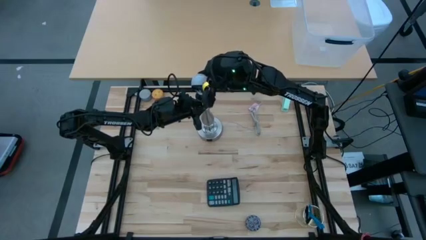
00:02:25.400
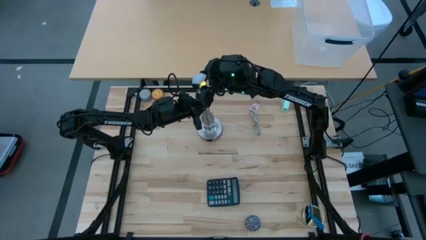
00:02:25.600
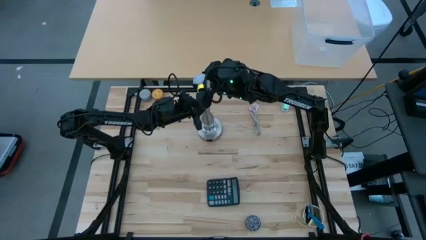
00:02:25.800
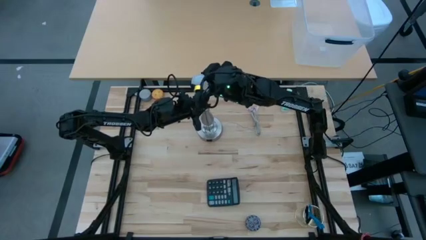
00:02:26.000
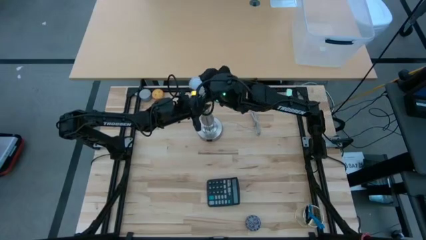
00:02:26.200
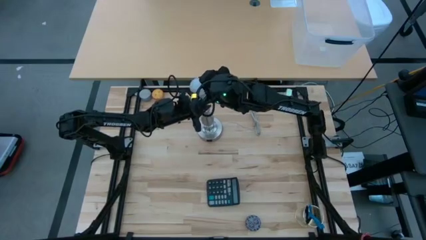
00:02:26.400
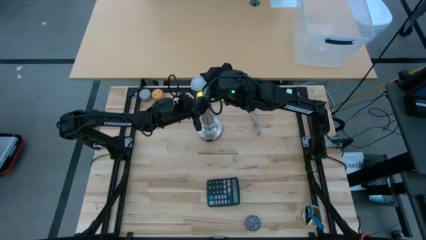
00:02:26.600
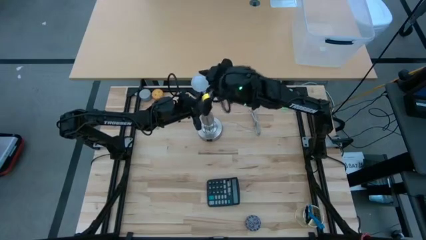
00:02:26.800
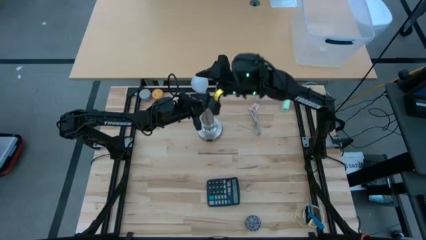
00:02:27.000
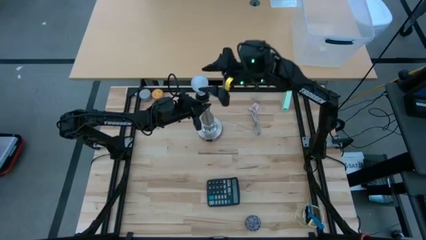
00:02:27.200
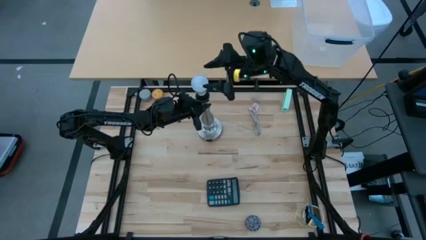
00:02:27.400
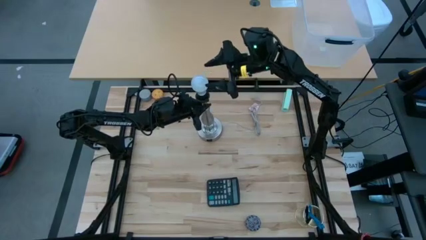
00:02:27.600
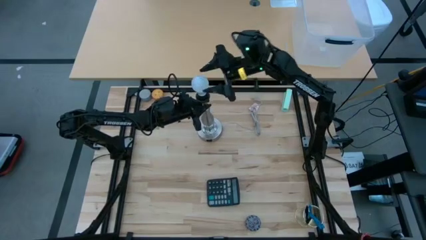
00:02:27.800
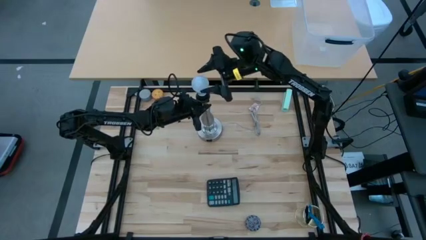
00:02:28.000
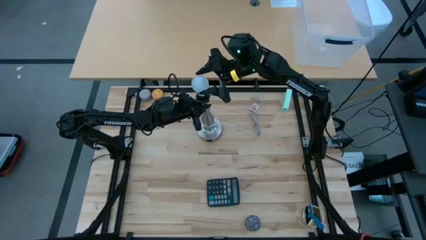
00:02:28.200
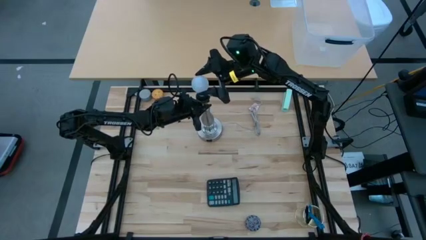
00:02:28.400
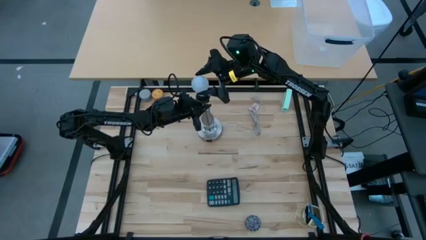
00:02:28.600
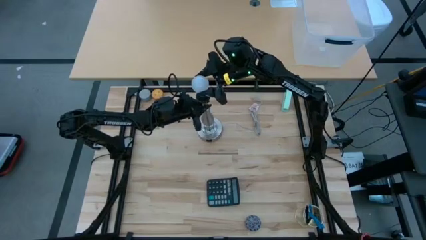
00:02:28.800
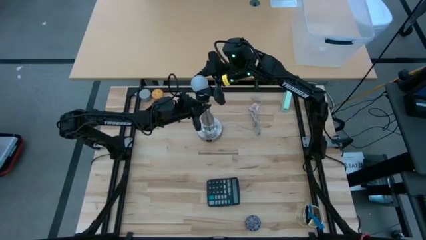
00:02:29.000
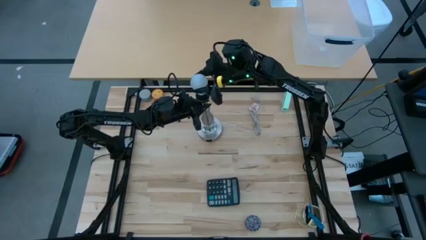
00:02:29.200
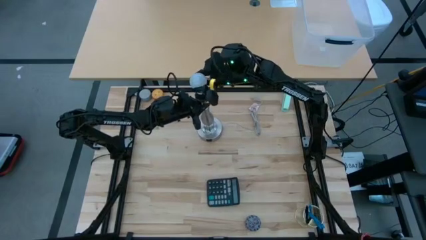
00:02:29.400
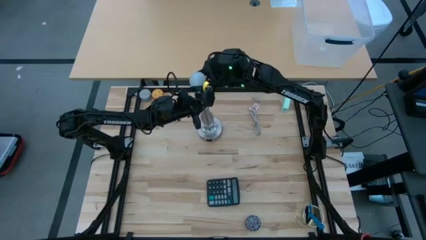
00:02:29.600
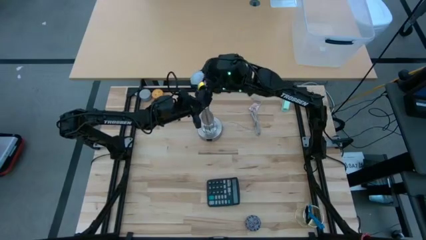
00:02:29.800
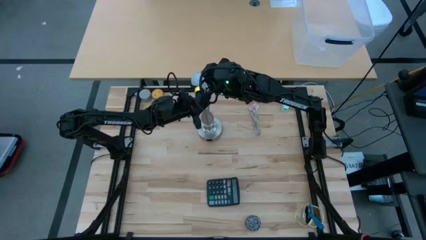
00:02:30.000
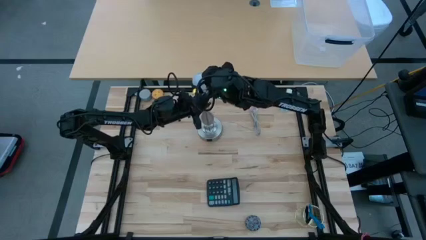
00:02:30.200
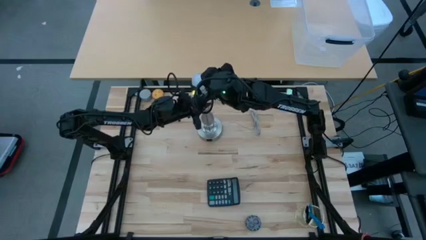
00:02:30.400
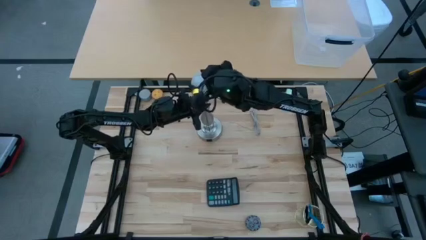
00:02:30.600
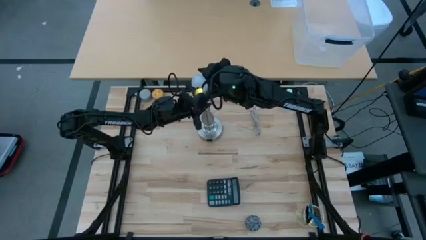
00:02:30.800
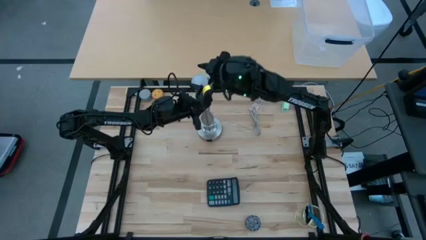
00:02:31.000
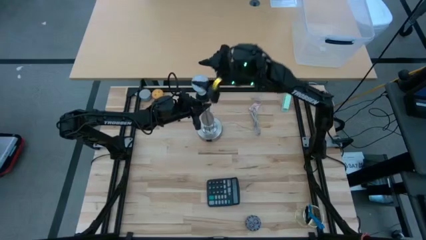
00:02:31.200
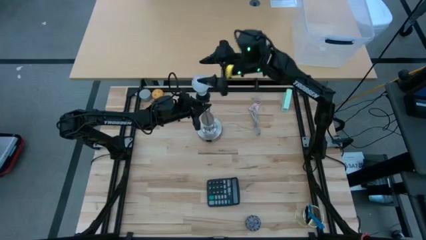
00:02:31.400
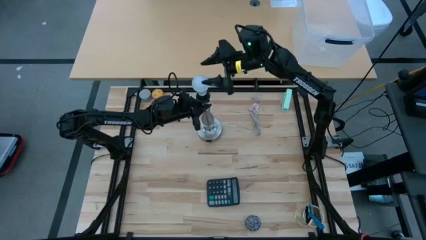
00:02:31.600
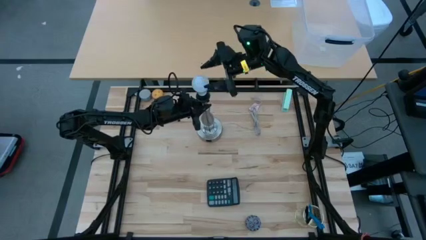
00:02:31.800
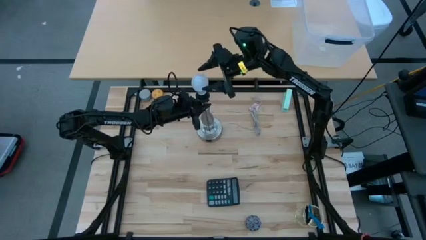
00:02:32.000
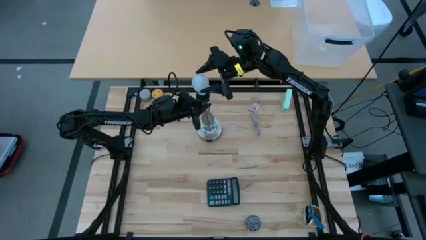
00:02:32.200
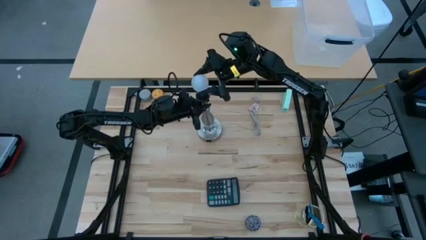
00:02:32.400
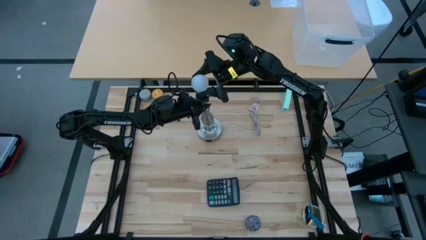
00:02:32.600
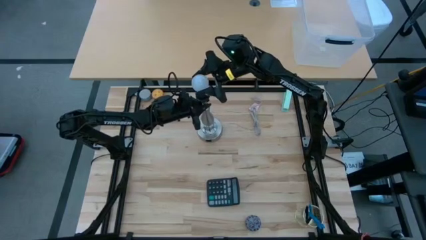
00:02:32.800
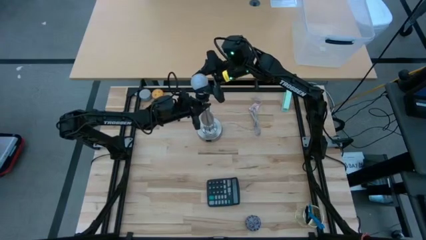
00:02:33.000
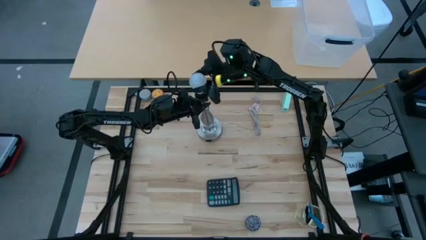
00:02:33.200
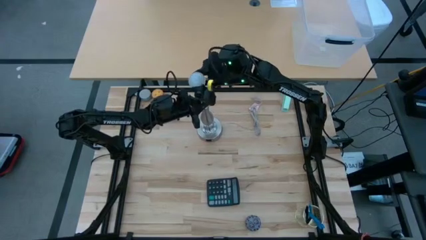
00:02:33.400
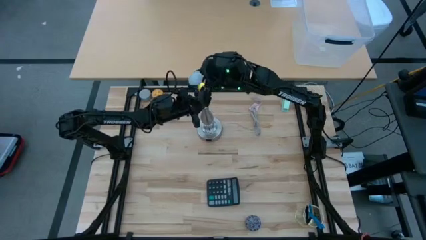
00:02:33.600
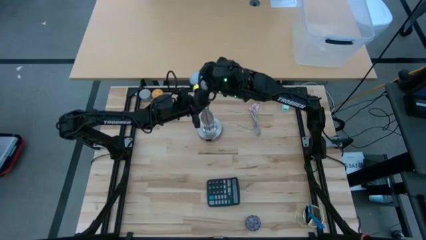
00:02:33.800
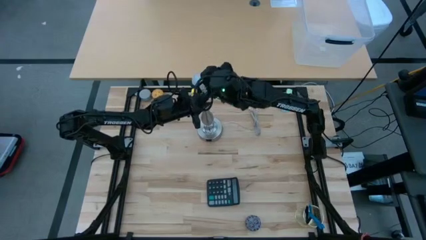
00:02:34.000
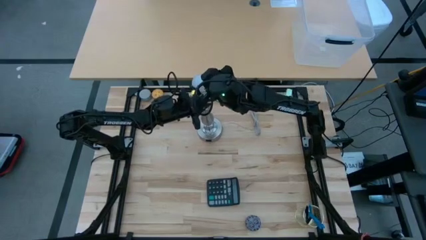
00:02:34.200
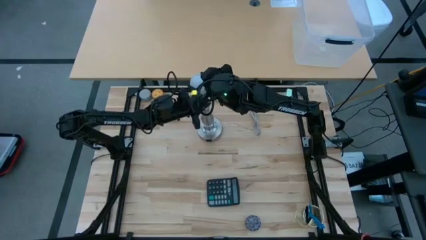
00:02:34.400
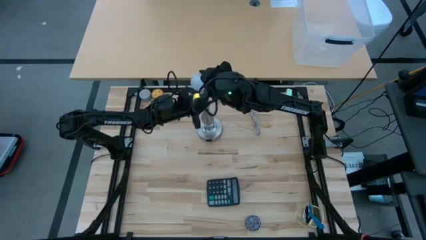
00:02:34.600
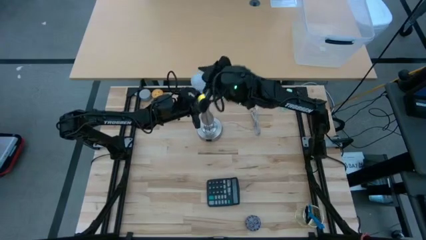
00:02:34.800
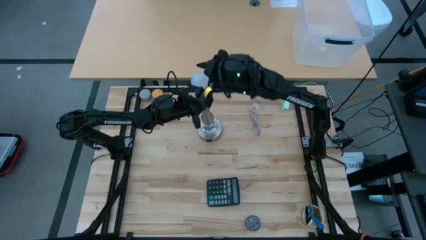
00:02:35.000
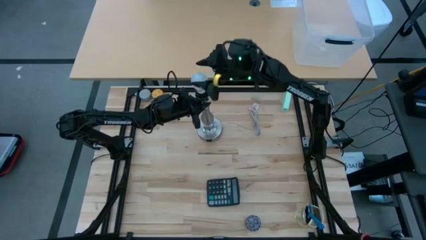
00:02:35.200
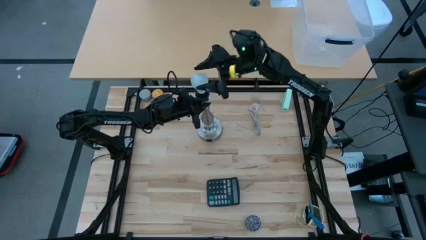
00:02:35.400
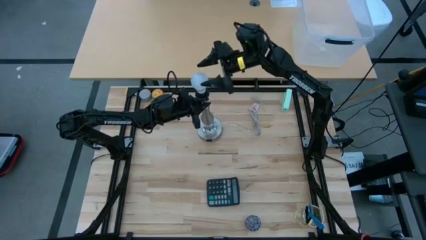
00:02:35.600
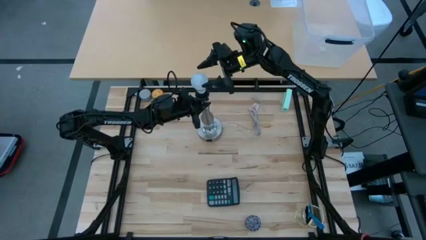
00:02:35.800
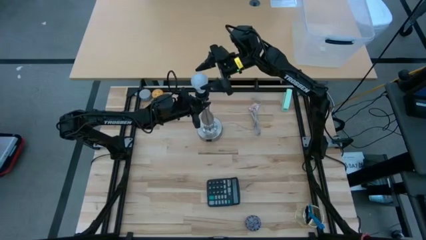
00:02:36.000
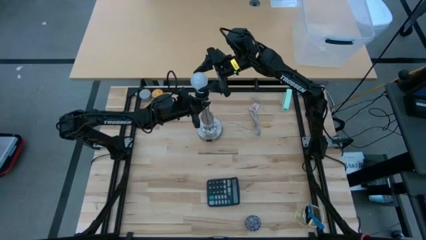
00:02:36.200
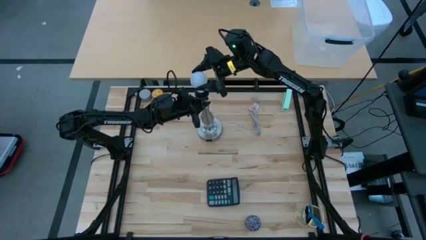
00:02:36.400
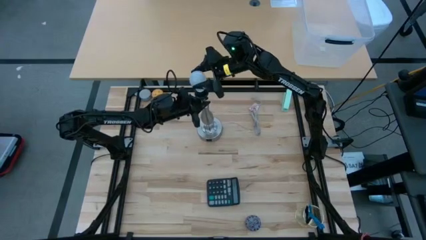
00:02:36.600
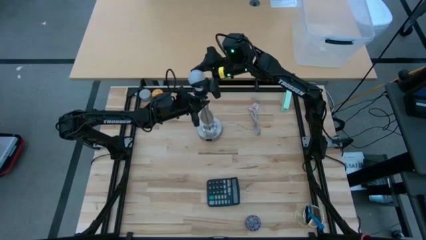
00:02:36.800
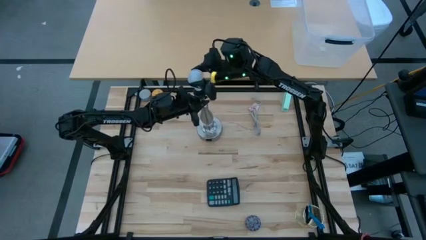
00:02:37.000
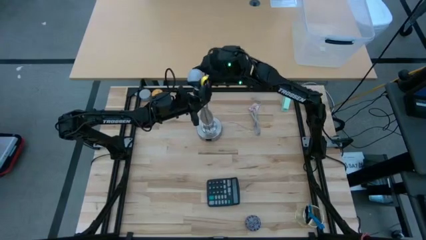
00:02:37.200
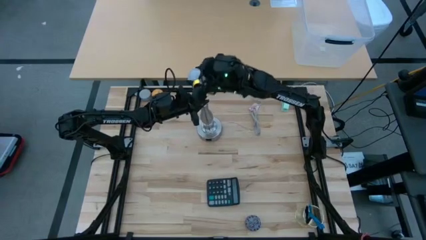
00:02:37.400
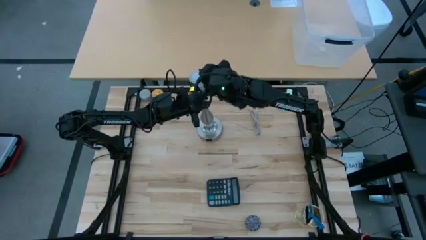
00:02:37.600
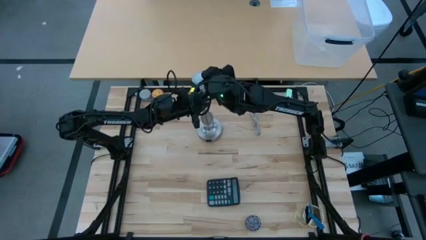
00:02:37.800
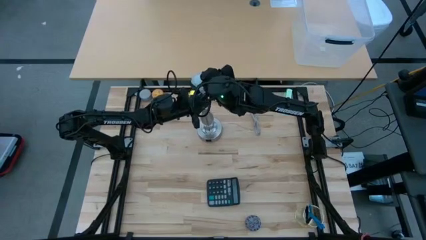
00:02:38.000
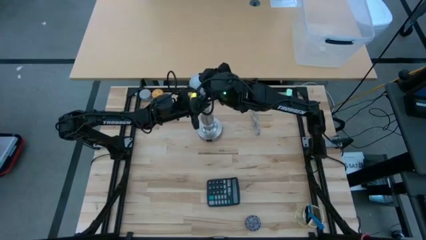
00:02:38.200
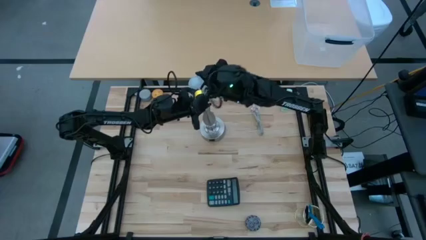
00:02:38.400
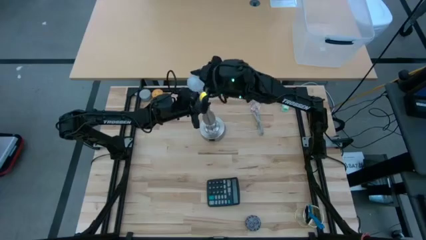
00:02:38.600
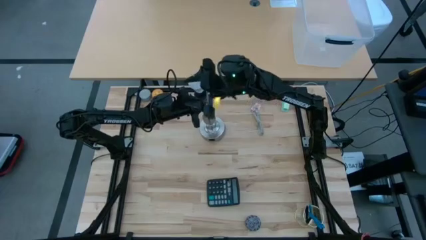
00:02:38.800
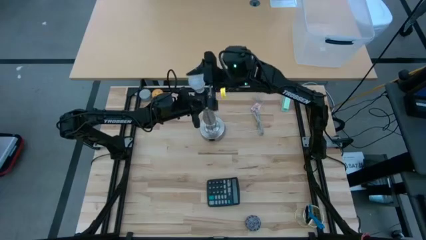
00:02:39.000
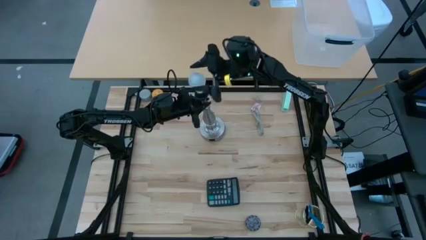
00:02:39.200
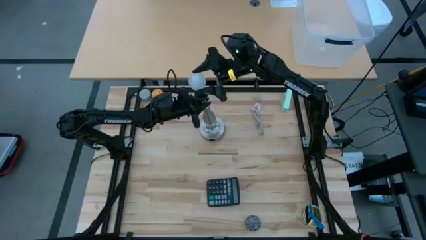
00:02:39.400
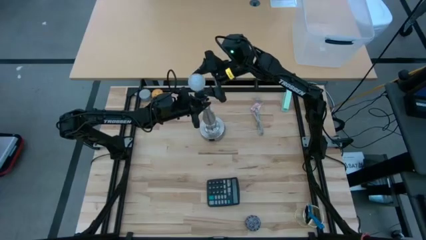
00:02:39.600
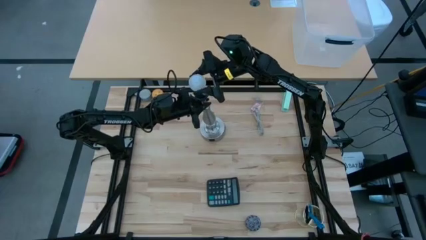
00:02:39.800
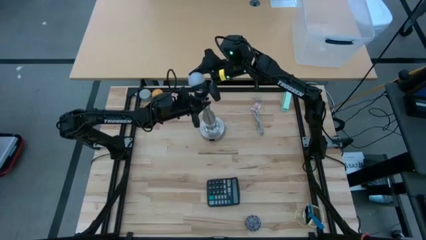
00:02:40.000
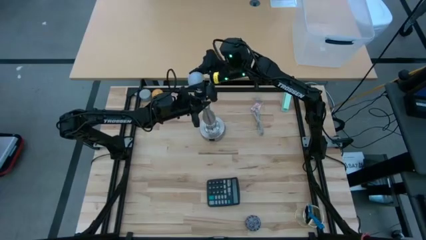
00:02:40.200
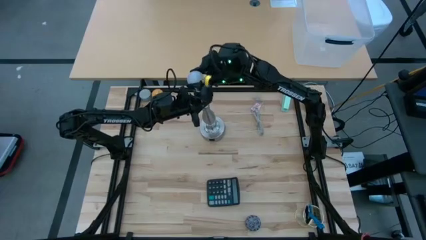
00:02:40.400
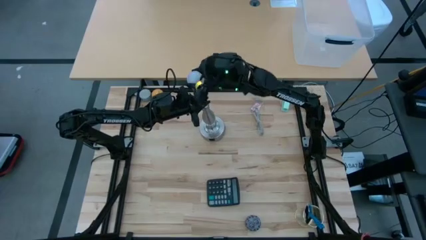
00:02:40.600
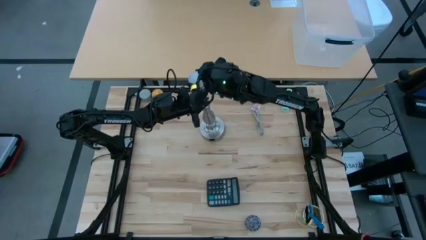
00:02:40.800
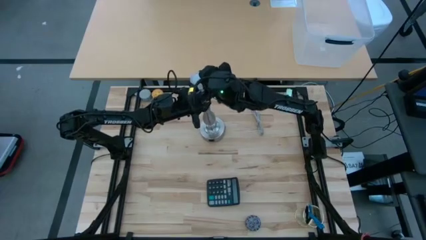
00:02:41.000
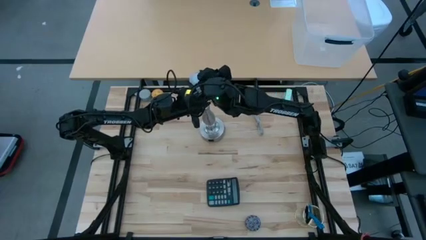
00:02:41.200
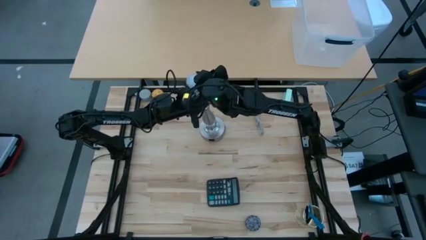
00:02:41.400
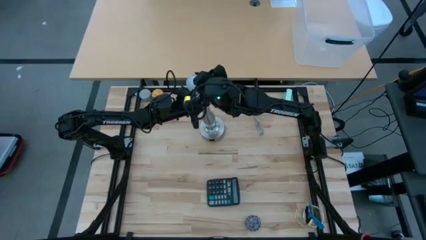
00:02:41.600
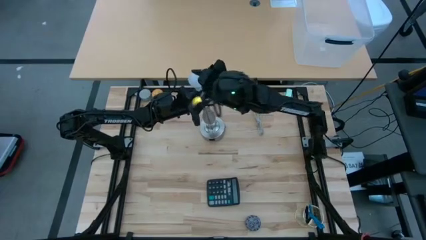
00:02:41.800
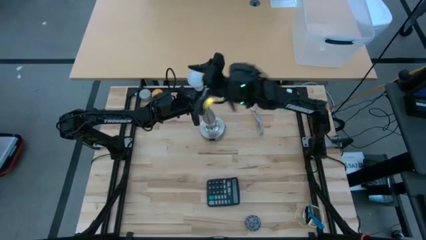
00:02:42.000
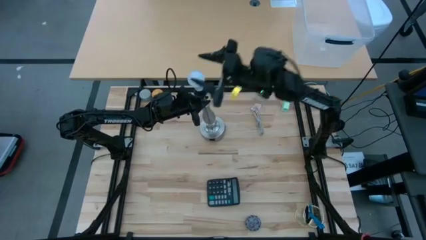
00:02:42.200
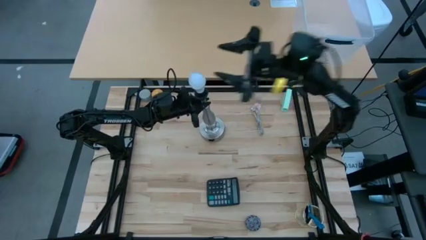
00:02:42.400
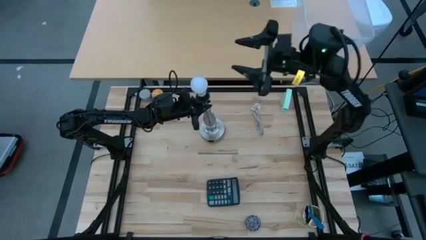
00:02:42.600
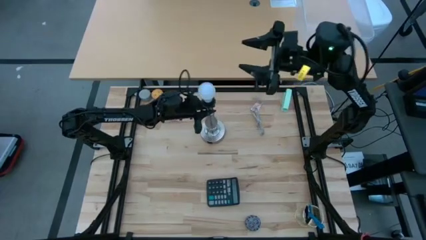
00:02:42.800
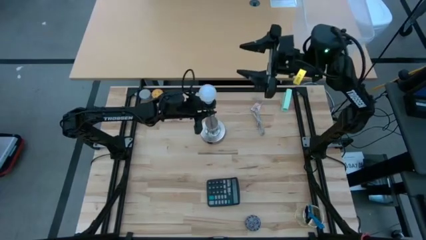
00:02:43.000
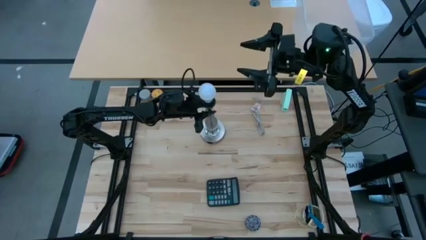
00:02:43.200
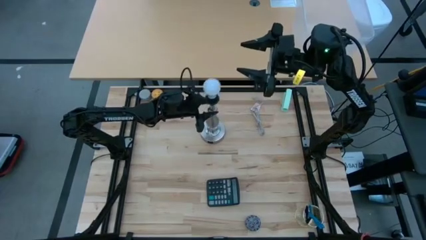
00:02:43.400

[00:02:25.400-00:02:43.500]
Task: Screw lightbulb
Insert the light bulb into the lamp
